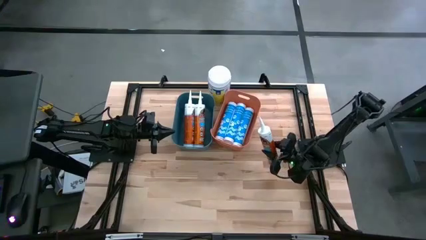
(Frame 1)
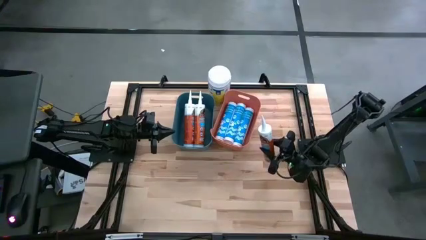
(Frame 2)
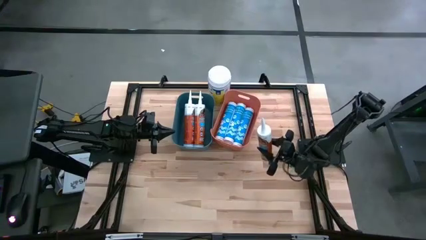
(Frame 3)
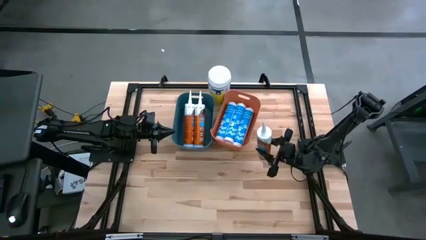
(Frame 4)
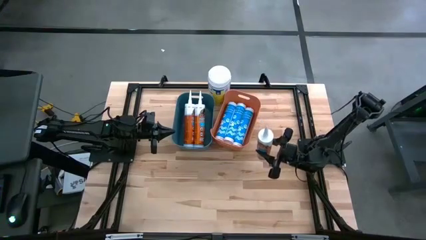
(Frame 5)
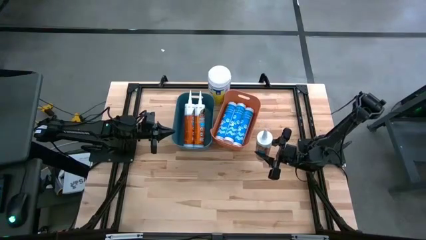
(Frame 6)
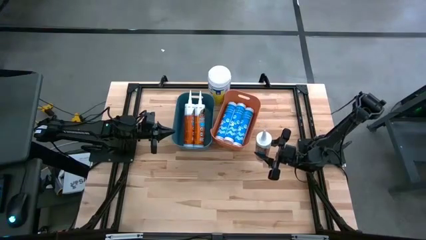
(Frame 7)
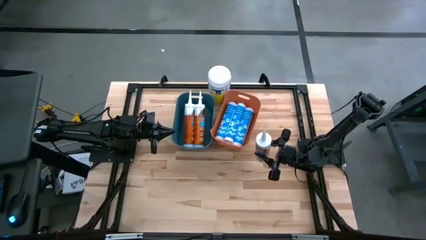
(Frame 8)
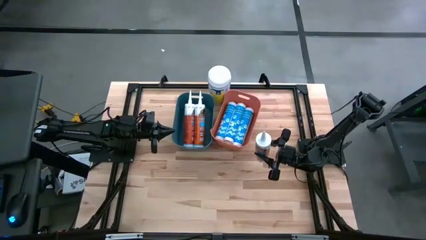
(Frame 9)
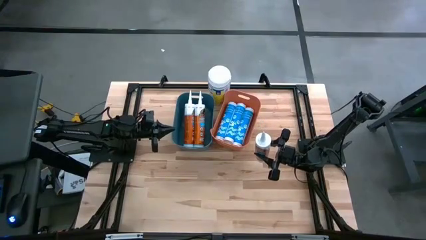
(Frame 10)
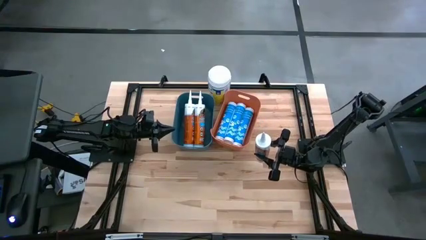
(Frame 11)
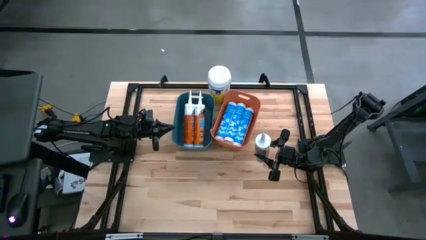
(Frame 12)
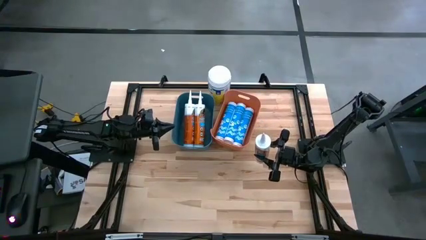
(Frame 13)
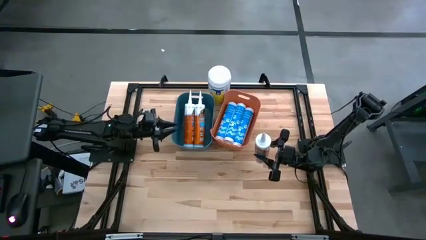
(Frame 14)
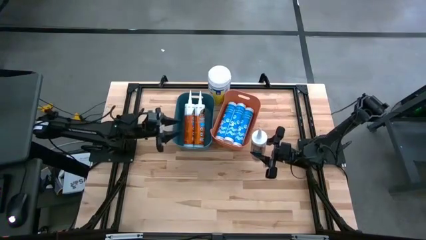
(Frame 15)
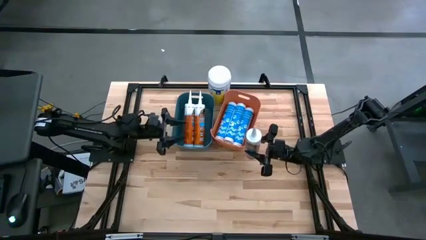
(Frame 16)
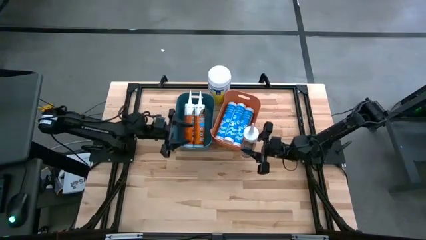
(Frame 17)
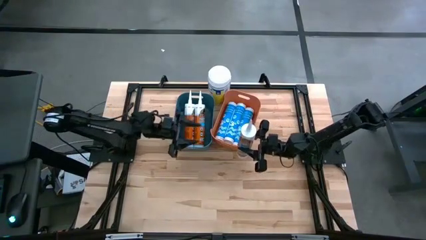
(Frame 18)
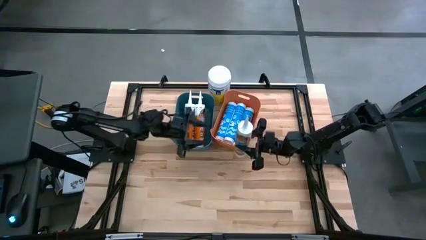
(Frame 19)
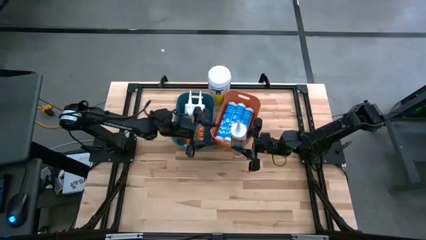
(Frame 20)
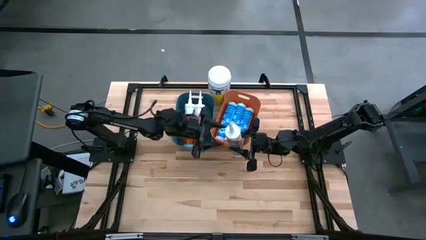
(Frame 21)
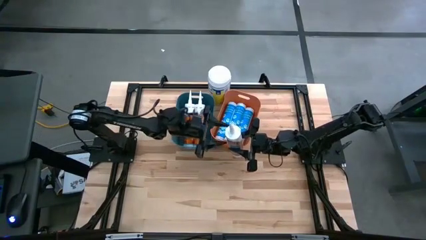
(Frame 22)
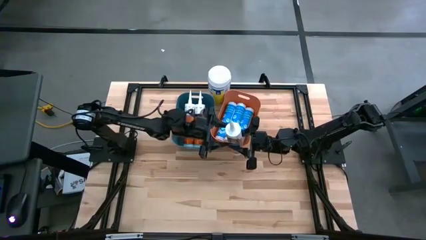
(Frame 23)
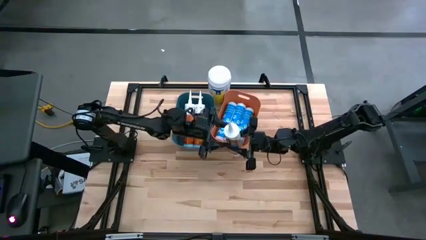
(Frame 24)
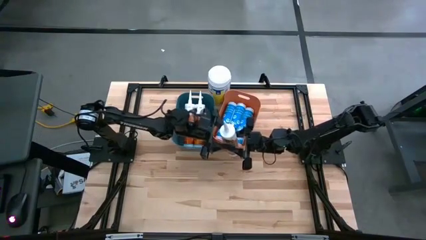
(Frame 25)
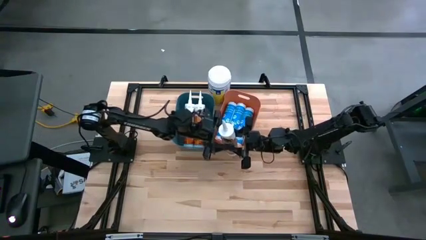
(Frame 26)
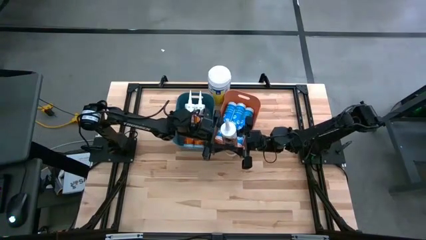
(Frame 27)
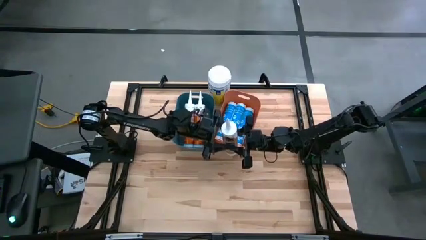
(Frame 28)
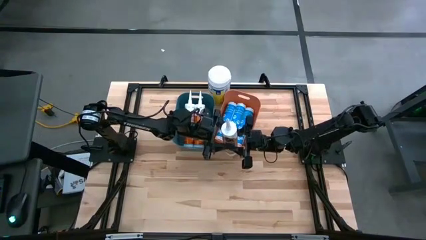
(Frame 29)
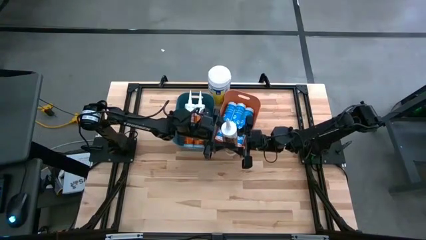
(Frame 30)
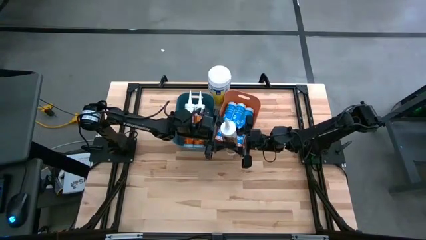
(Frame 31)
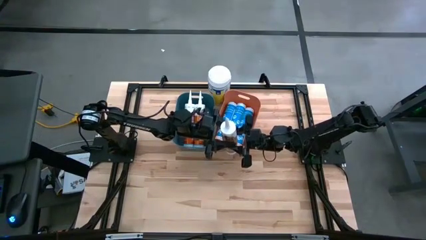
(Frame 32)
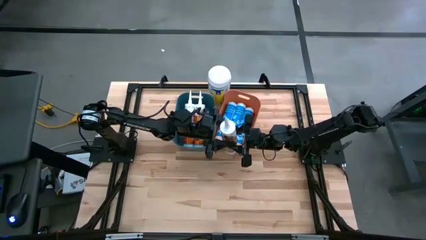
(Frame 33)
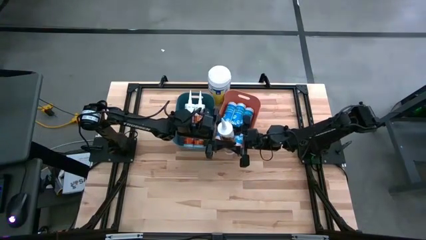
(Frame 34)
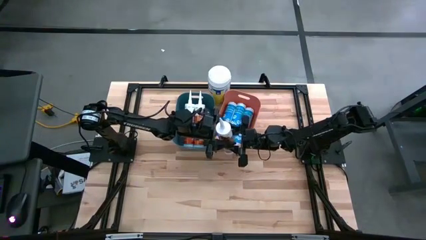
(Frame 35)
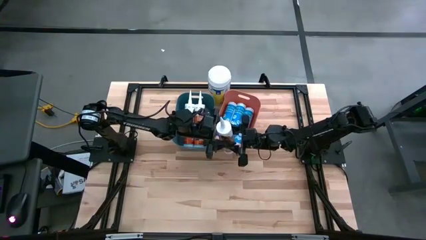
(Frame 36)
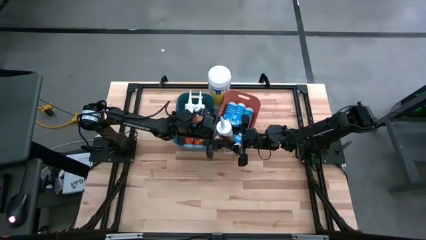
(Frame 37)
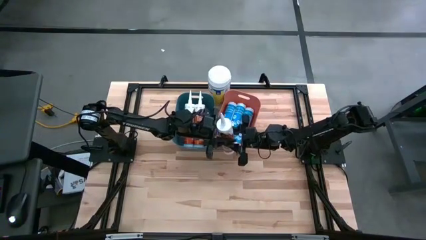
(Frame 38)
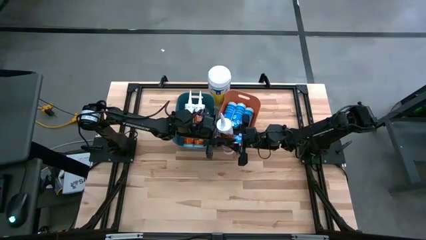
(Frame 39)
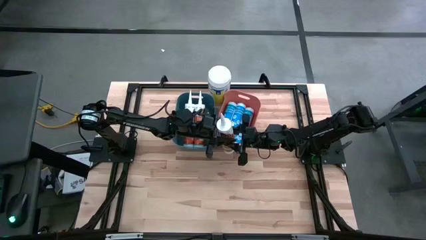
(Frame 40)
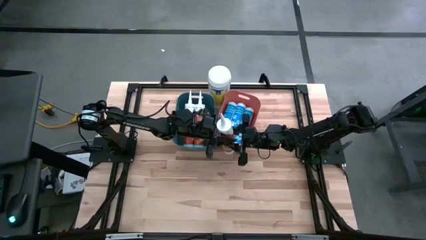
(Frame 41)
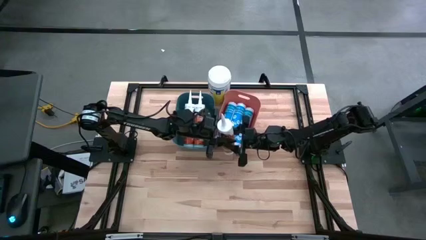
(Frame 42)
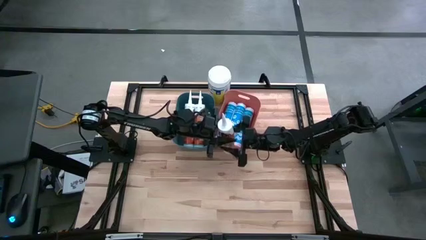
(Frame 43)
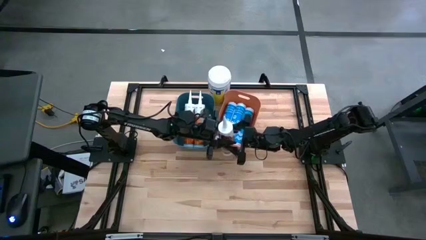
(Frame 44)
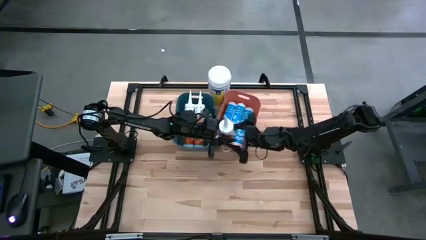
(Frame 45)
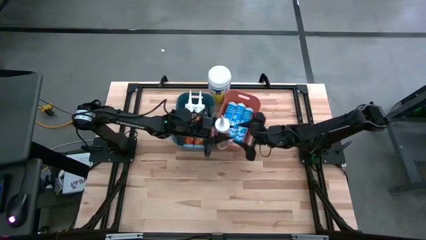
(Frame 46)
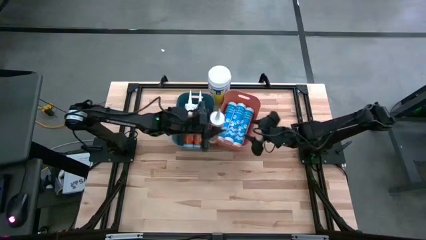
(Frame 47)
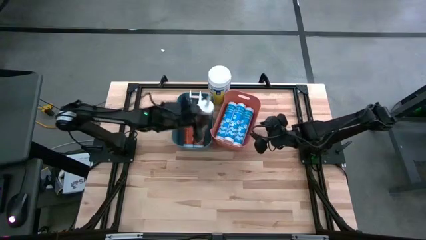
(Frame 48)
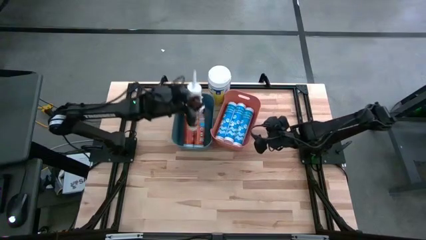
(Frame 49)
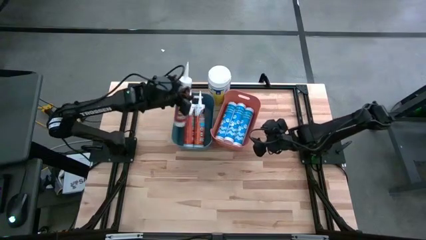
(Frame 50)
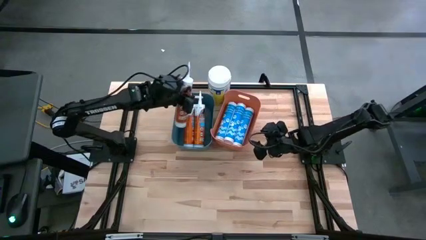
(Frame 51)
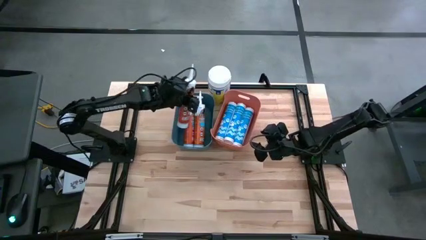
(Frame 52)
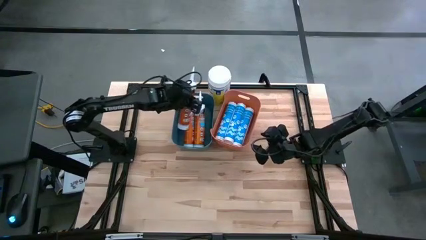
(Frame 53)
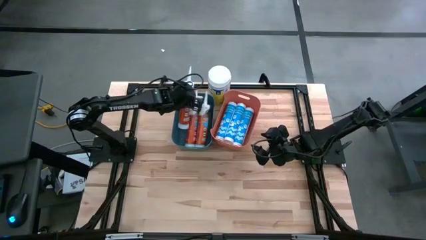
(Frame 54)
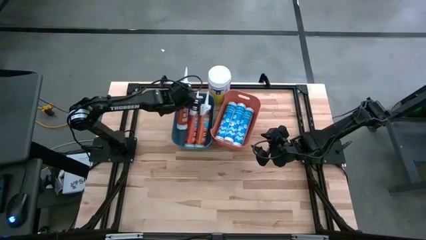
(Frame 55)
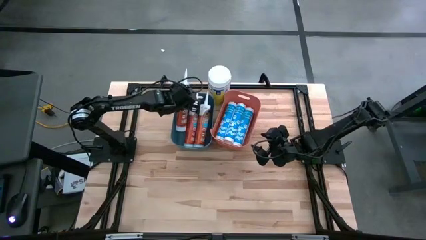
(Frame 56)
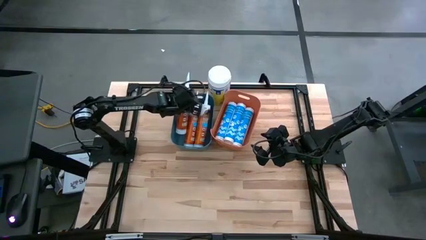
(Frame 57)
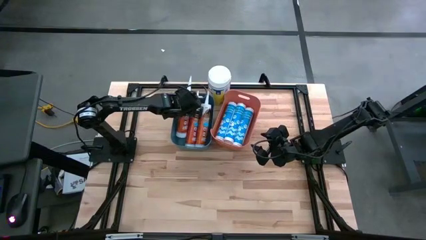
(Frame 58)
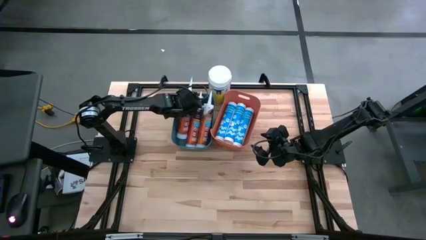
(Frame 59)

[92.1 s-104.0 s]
Task: Pick & place silicon tubes, Sealant and Lysol wipes
Put the orange sealant into the blue bin

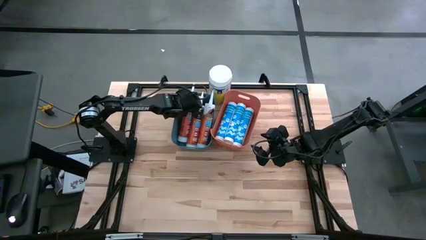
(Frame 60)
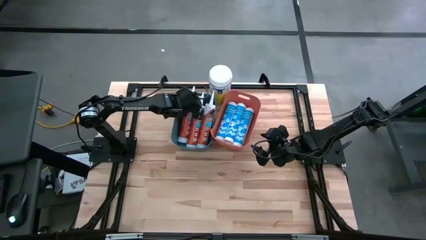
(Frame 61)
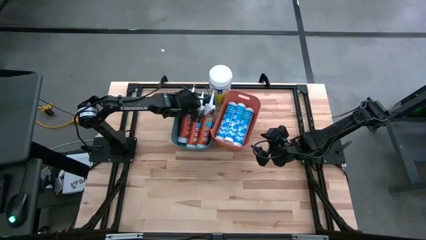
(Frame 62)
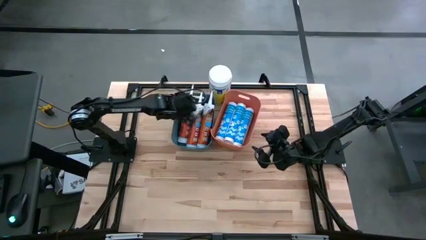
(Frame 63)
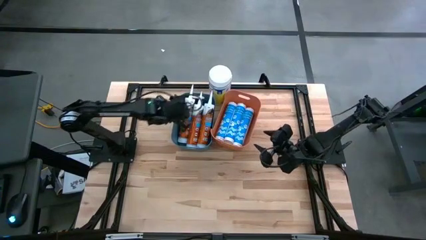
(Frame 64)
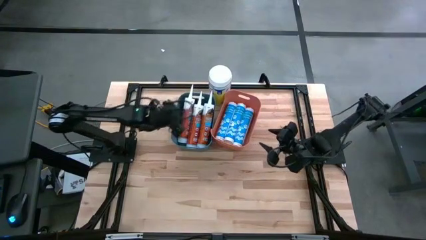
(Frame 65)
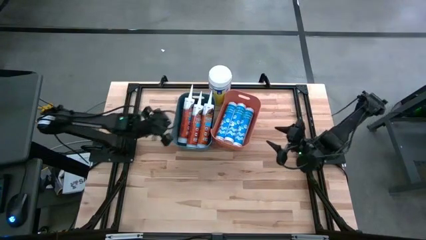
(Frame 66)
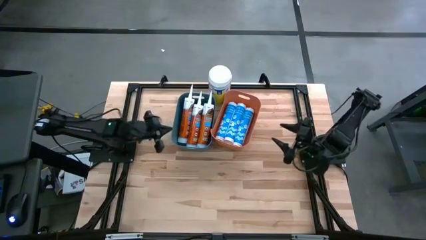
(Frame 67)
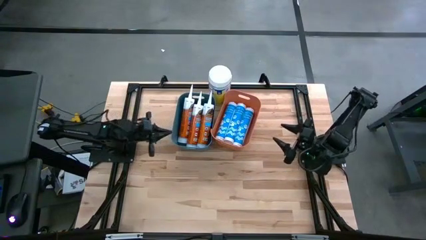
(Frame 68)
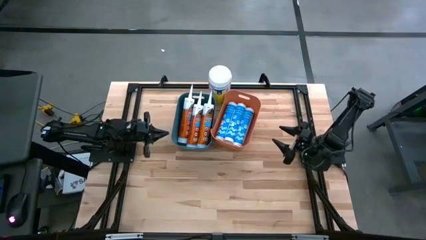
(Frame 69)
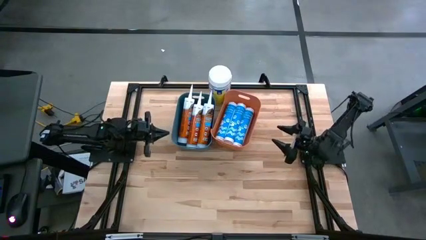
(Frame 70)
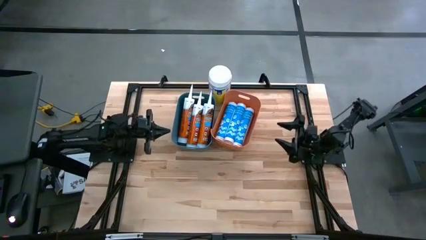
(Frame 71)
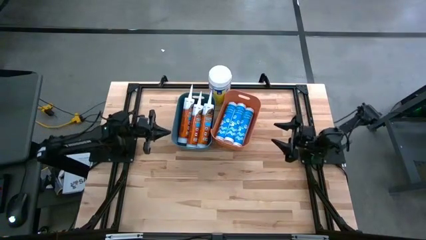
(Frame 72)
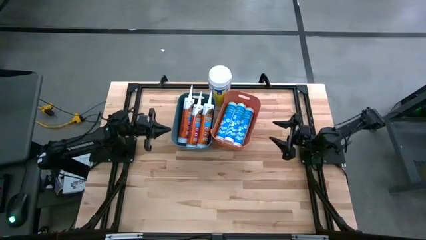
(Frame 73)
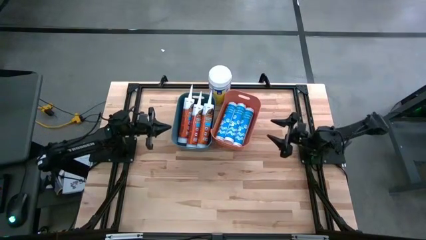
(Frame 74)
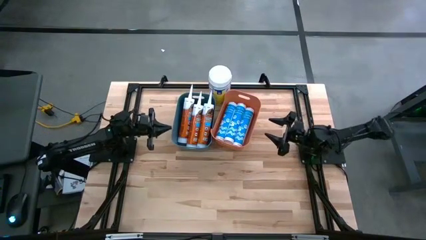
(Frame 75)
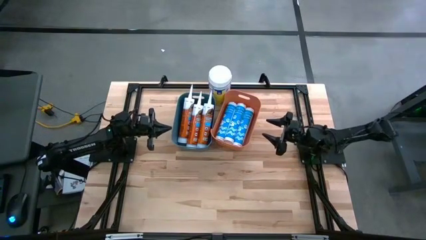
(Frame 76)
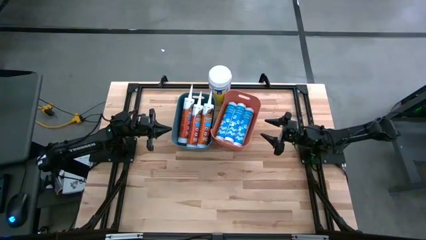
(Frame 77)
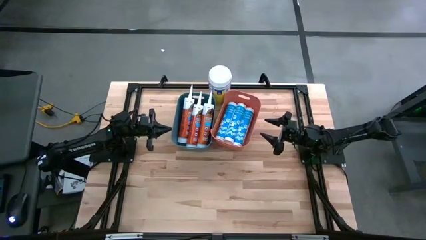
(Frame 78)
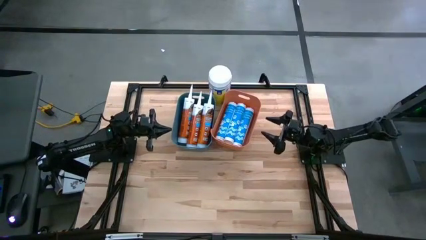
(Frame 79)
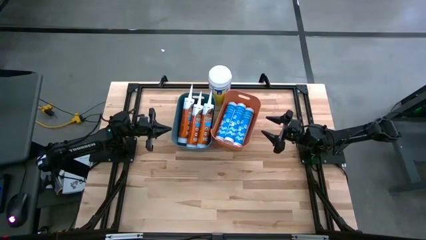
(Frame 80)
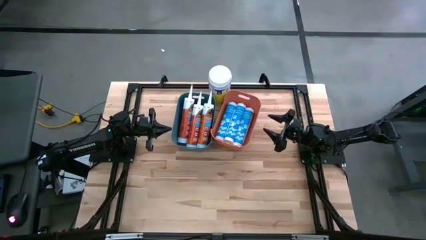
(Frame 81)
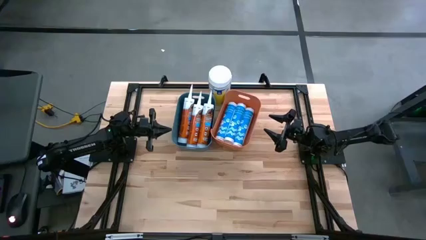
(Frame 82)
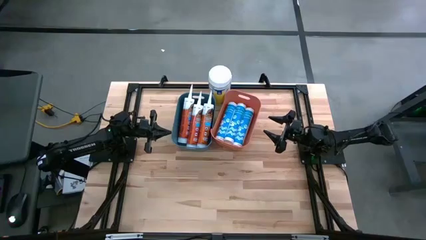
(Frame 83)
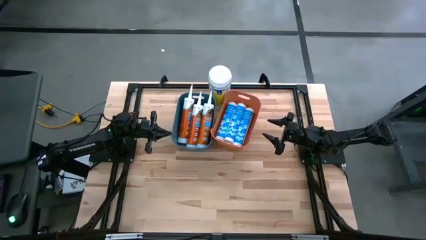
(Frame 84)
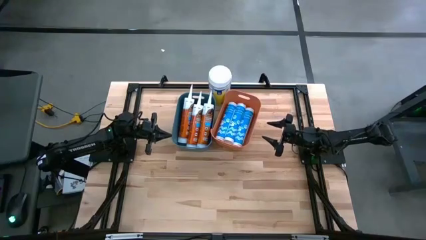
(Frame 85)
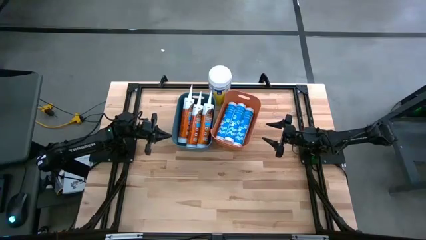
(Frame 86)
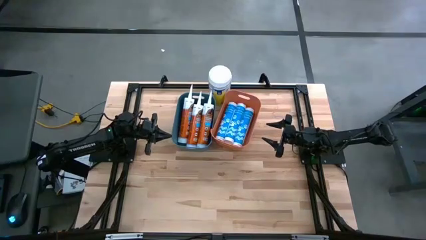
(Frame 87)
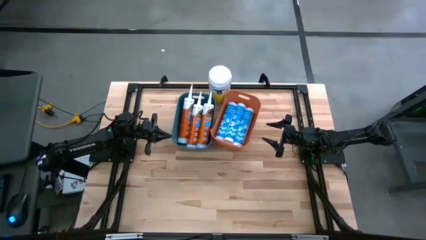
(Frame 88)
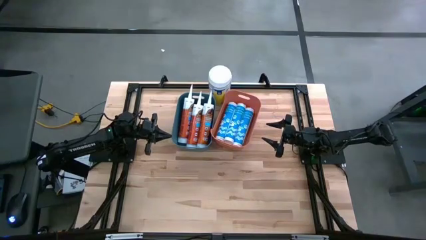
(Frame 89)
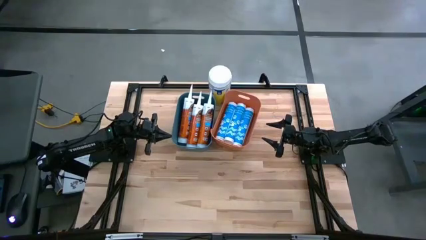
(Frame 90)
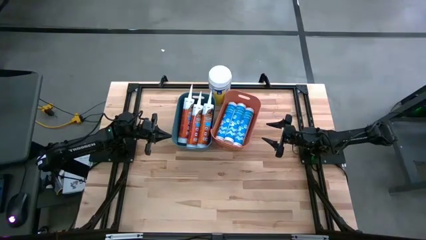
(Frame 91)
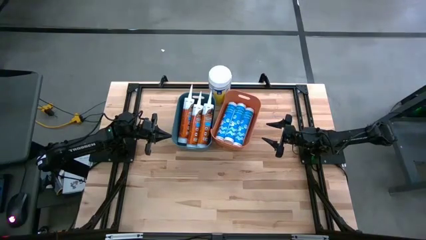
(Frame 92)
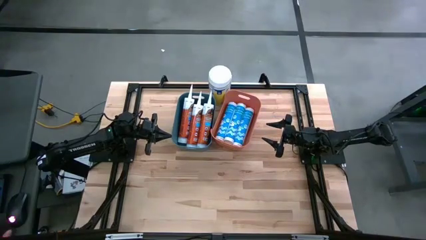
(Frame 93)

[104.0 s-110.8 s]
Return to Home Position
